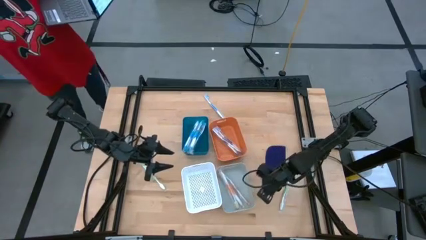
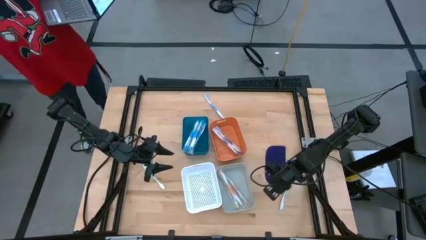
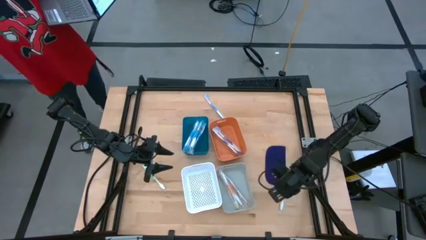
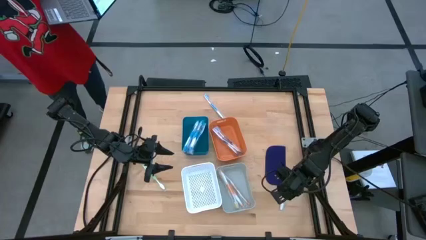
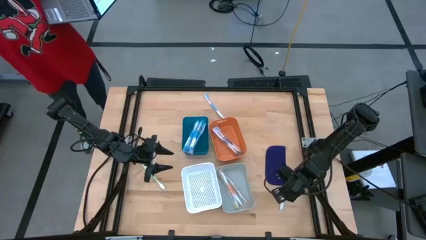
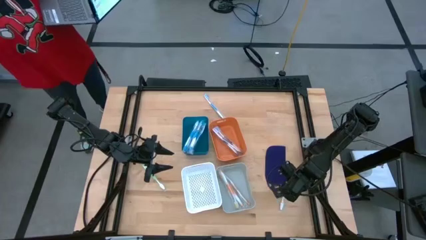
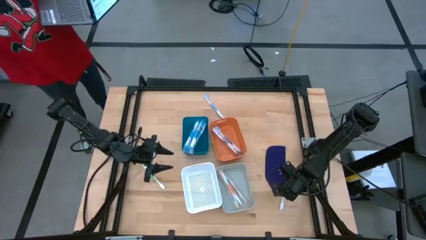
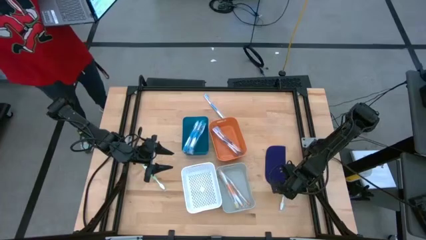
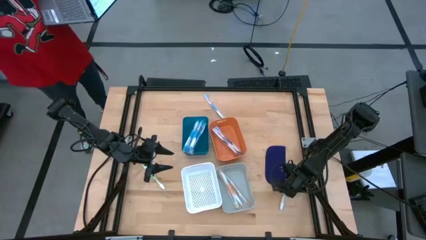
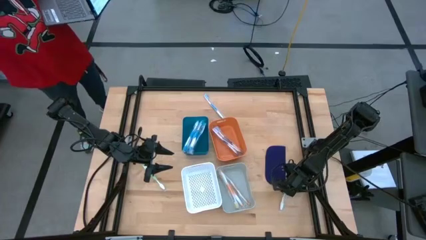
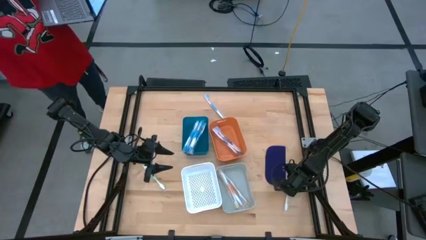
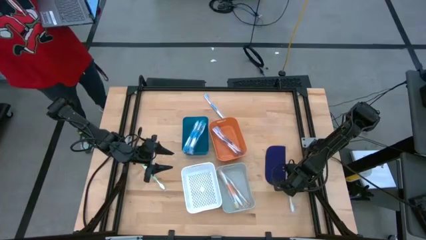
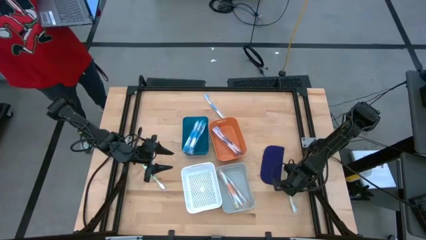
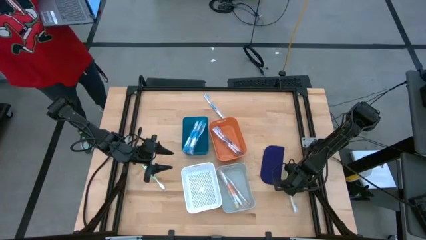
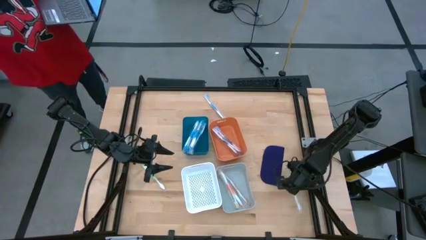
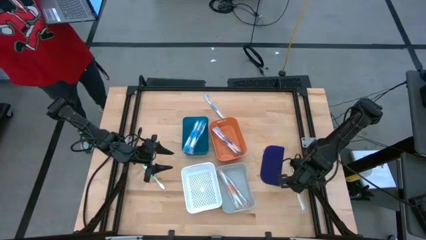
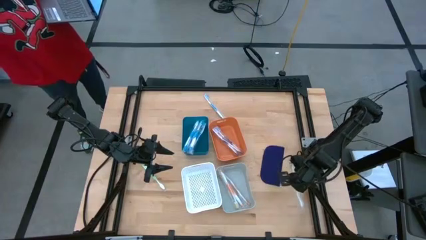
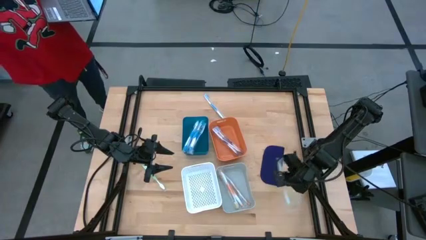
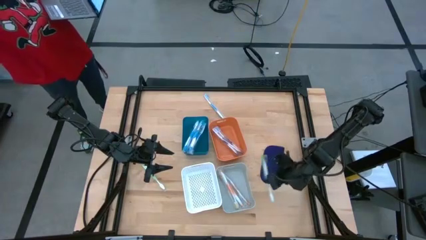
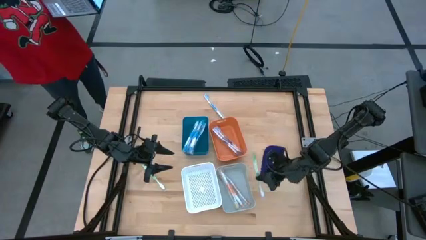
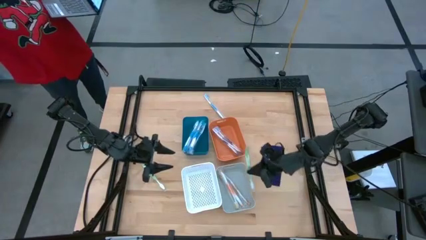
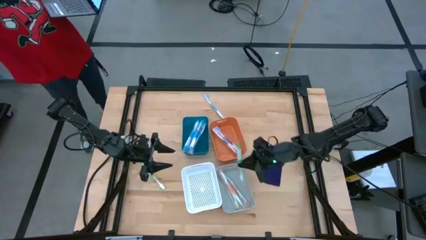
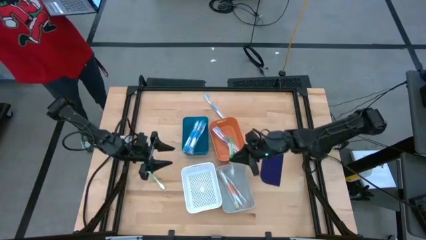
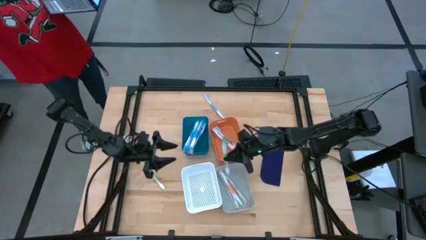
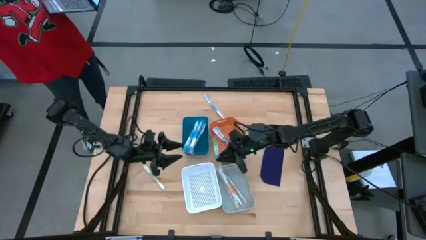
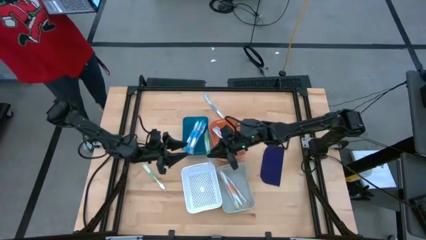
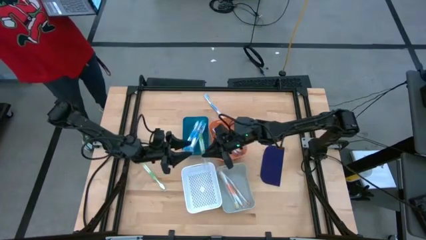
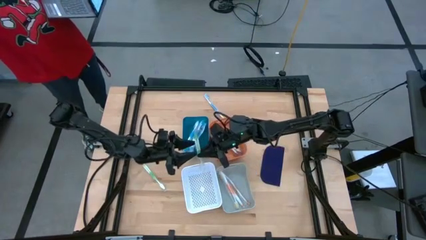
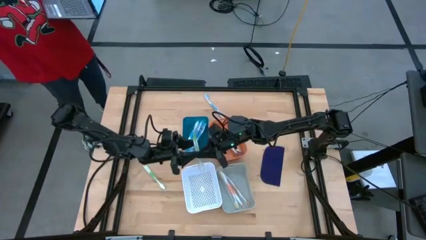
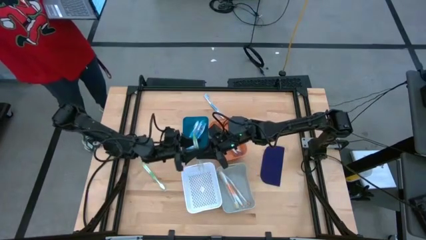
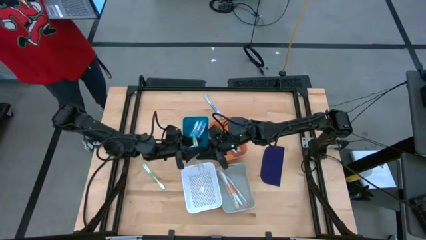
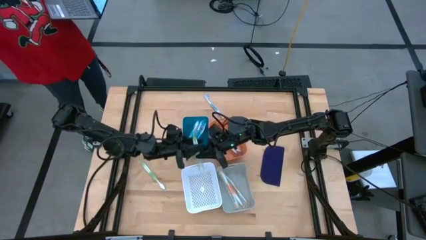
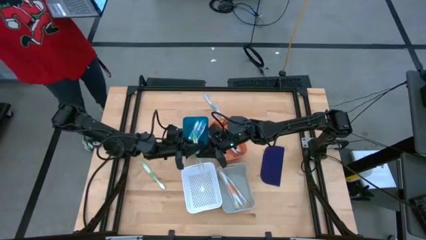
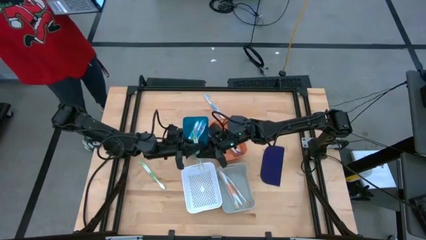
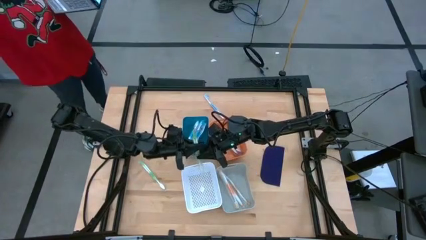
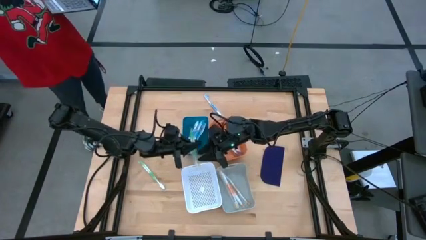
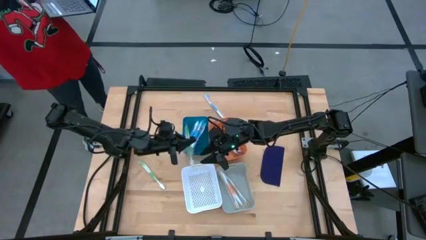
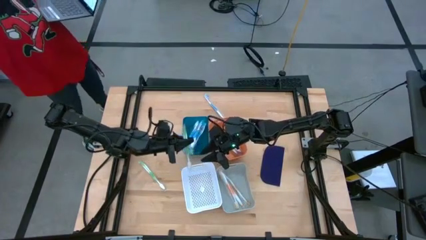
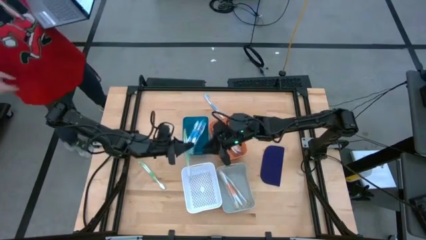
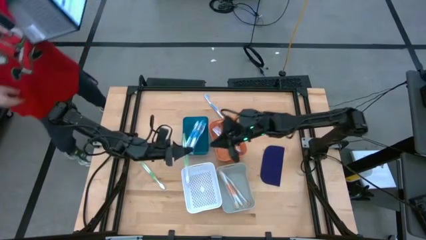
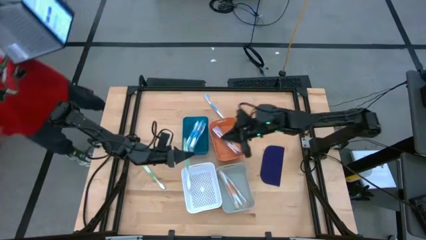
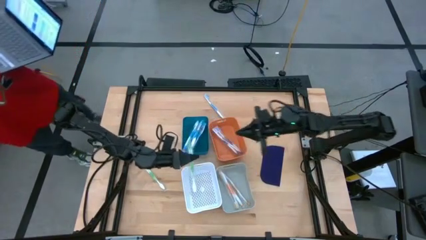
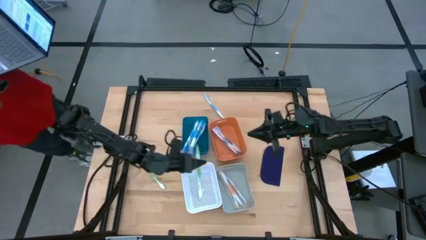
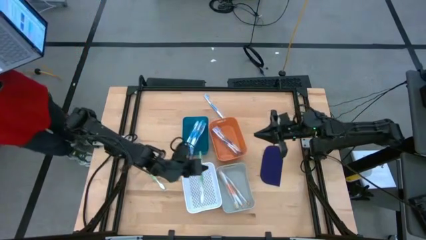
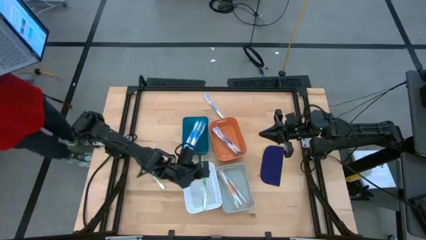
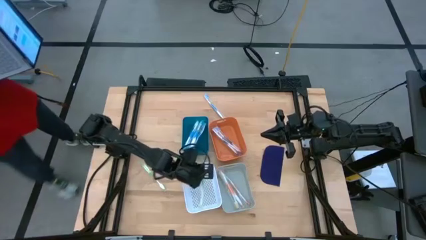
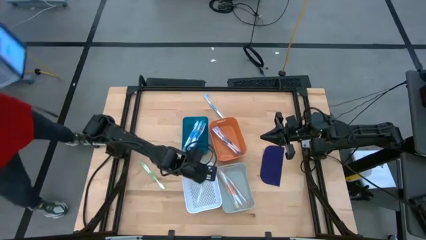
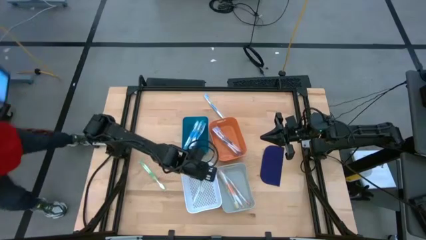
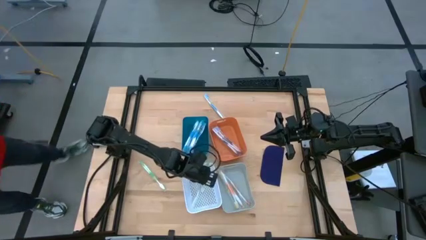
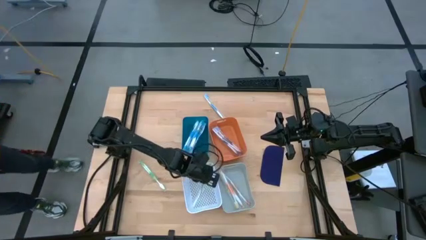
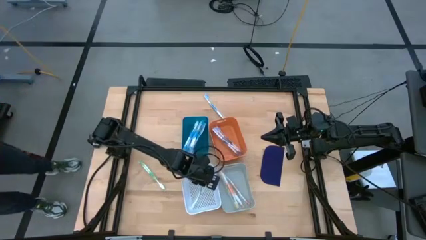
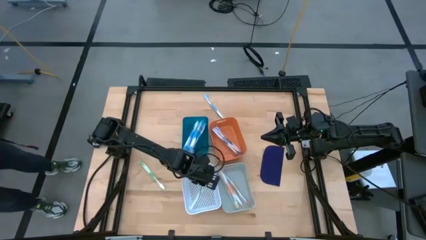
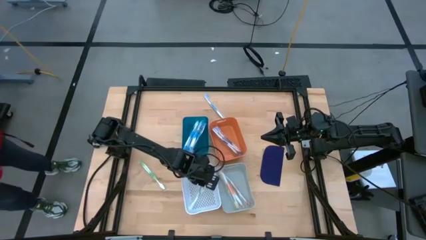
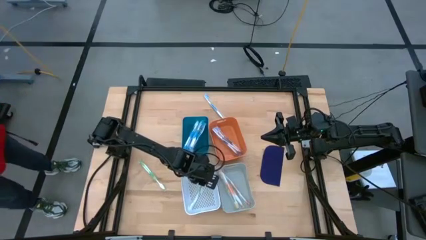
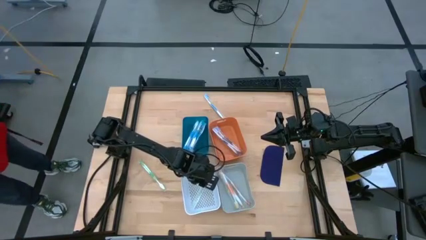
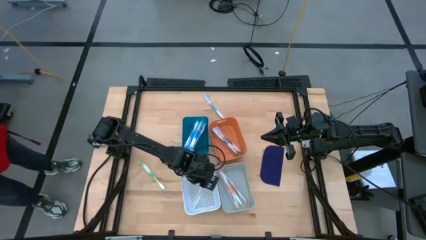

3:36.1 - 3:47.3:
Task: Pick & Place Toothbrushes
Put the green toothbrush into the white bin

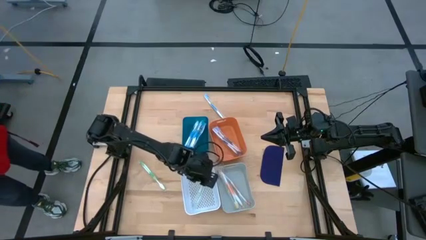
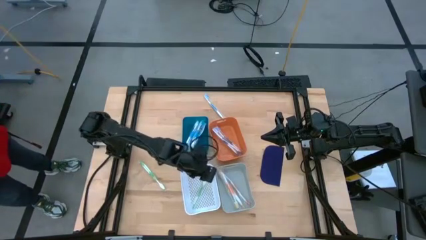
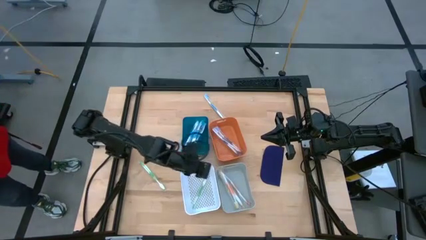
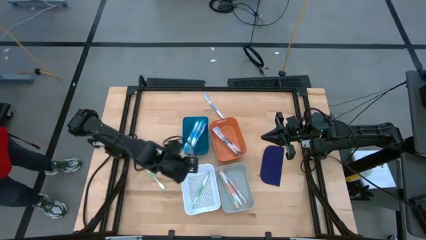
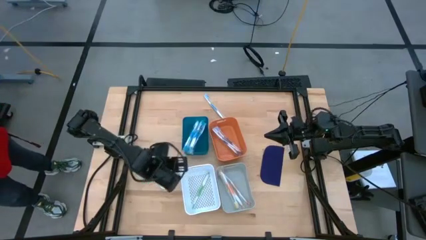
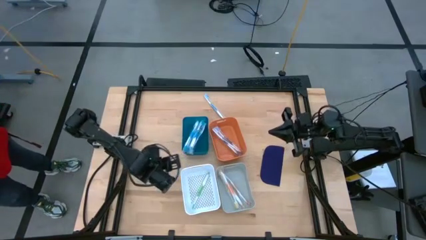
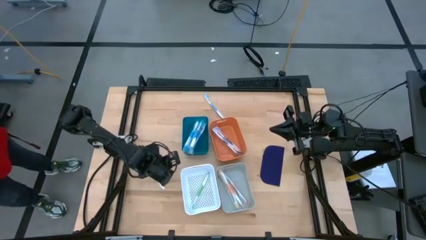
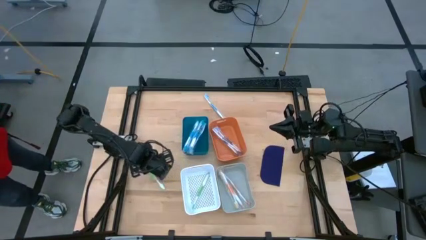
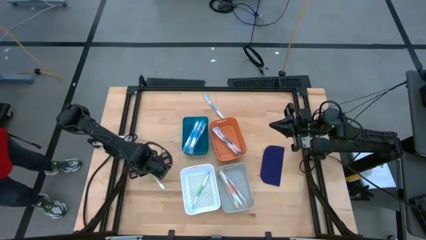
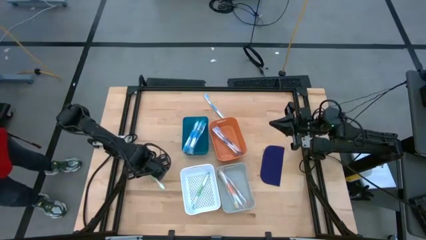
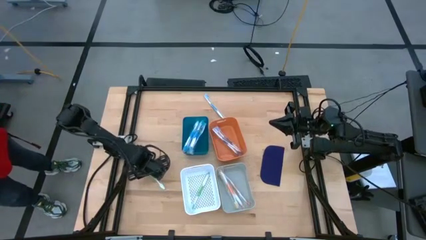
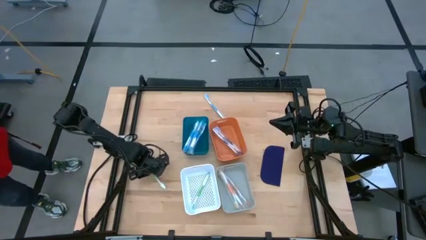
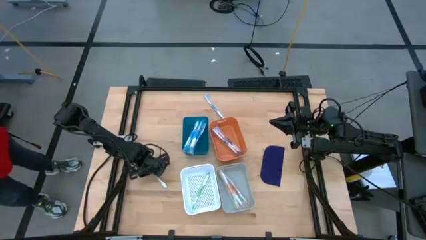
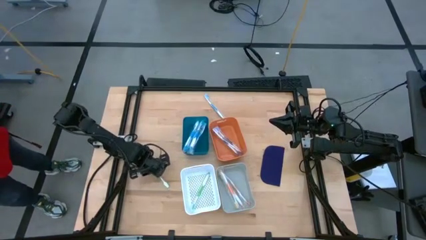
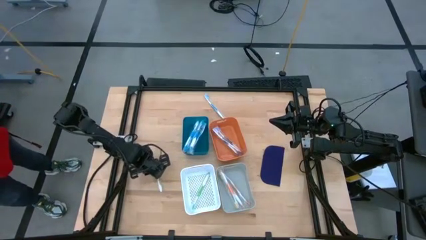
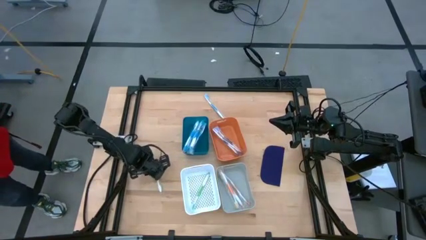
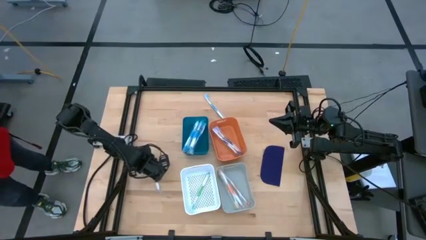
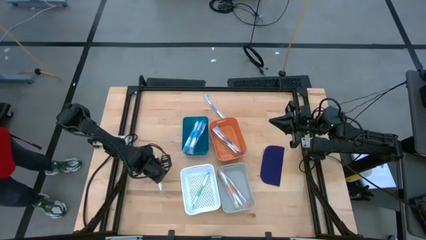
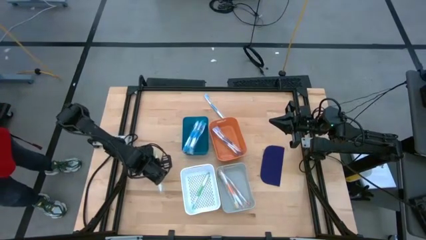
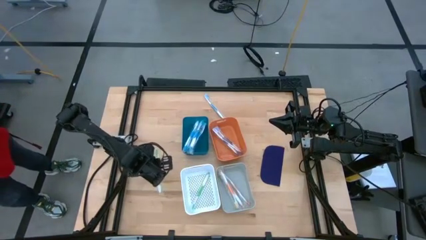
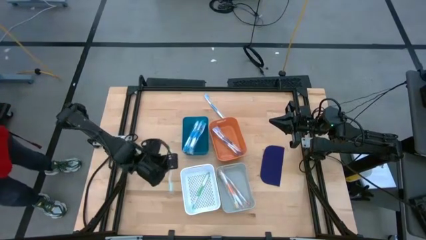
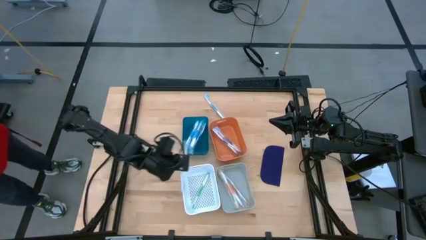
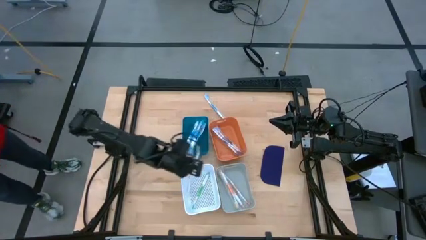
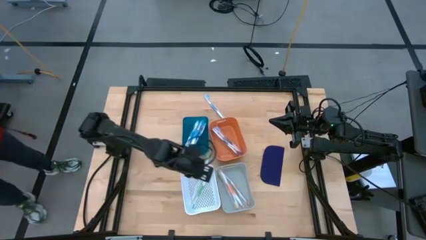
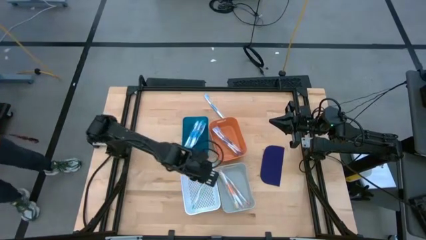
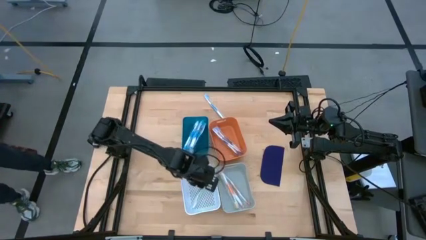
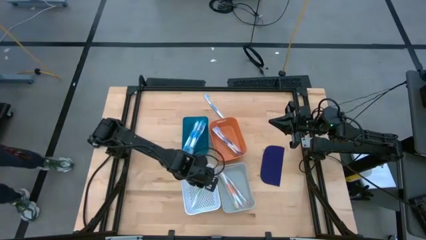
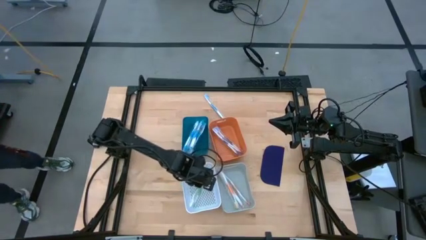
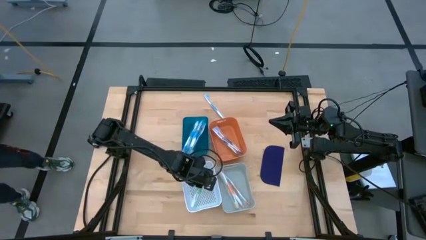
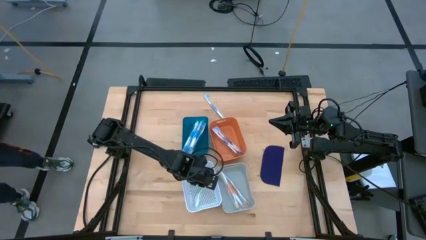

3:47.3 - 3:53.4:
Put the green toothbrush into the white bin
